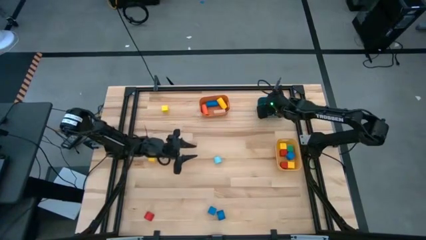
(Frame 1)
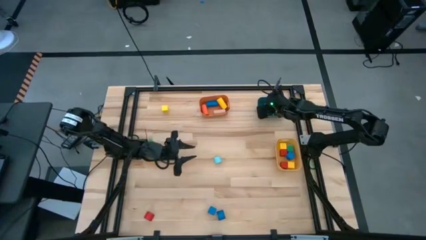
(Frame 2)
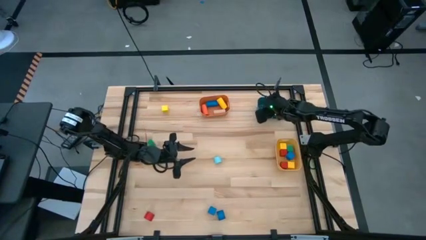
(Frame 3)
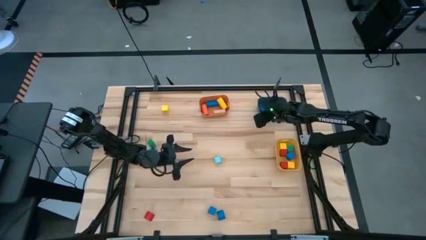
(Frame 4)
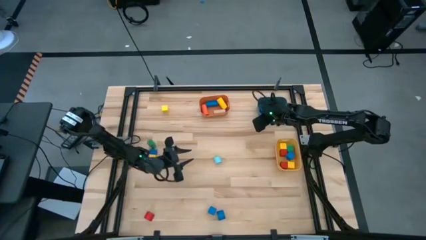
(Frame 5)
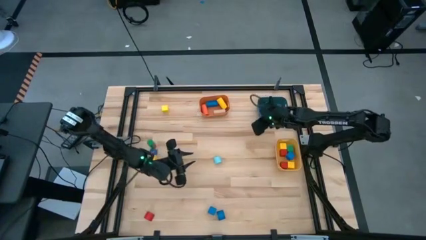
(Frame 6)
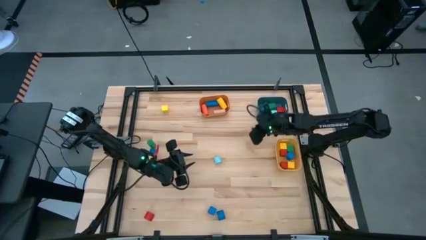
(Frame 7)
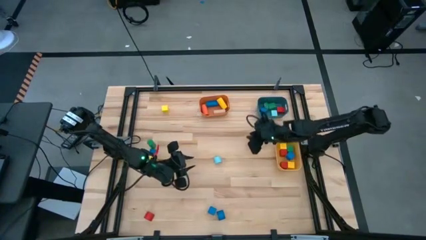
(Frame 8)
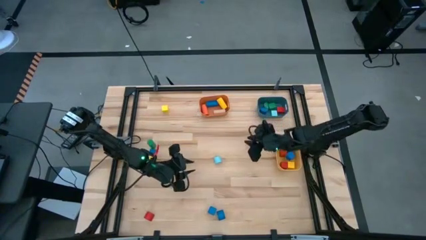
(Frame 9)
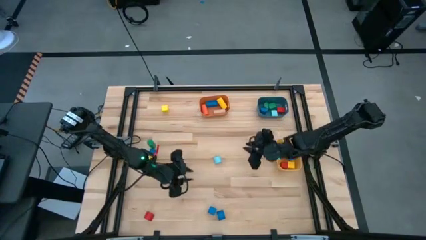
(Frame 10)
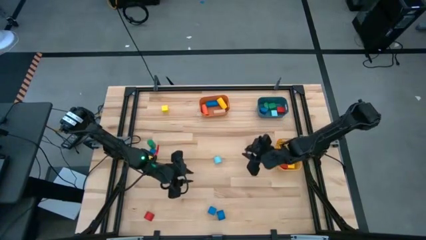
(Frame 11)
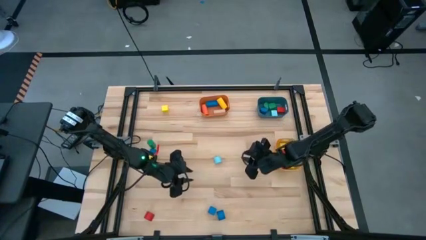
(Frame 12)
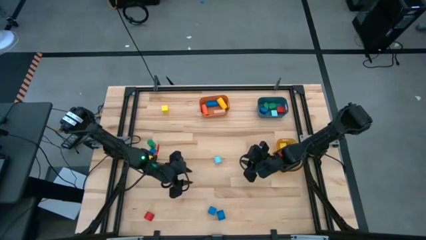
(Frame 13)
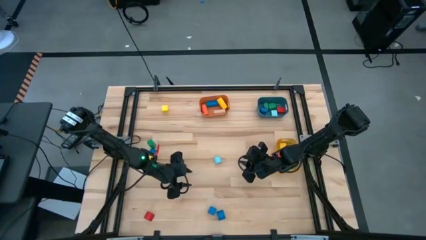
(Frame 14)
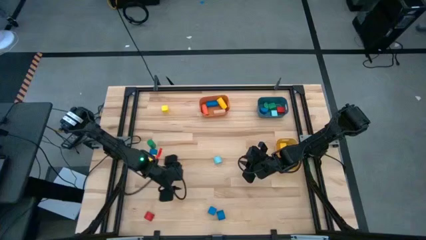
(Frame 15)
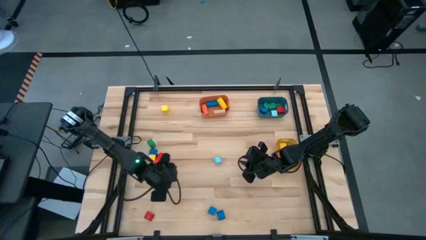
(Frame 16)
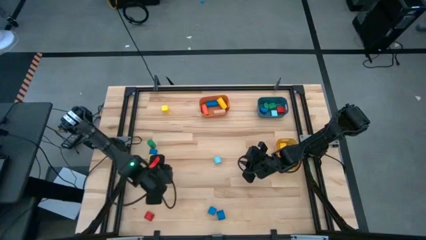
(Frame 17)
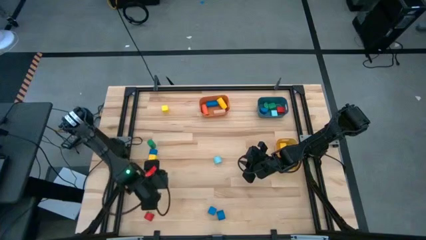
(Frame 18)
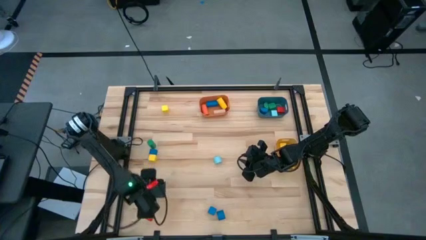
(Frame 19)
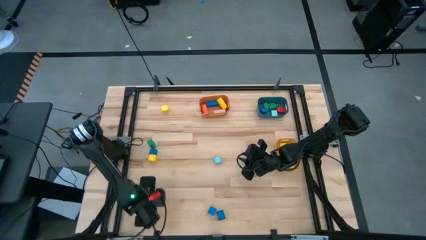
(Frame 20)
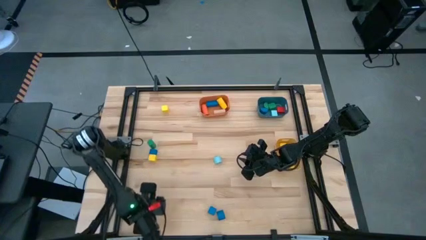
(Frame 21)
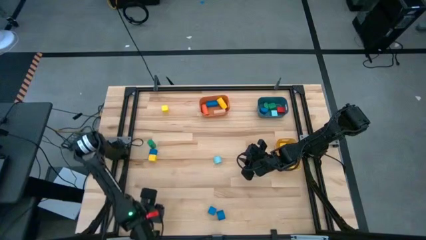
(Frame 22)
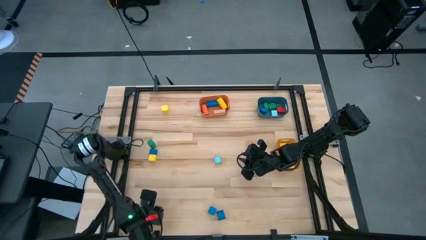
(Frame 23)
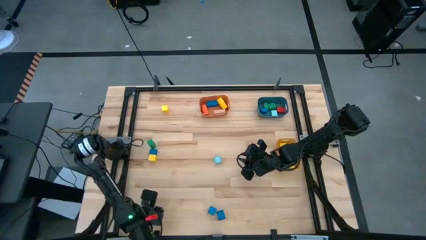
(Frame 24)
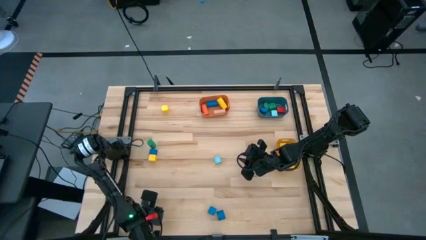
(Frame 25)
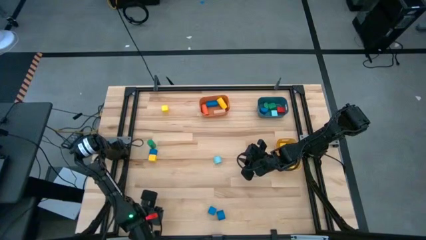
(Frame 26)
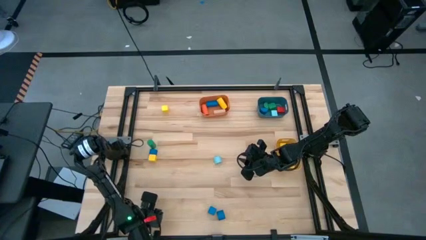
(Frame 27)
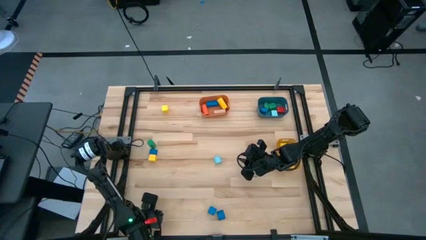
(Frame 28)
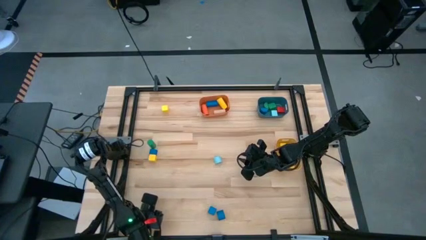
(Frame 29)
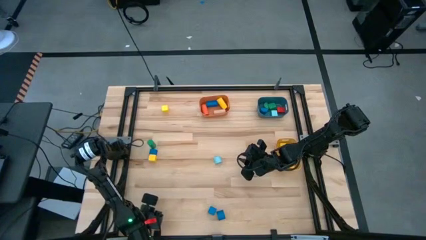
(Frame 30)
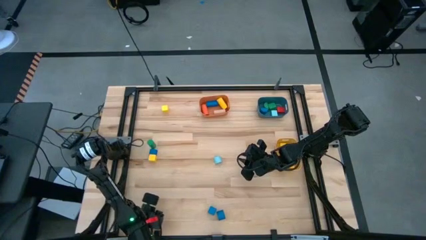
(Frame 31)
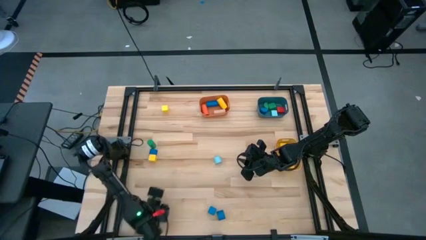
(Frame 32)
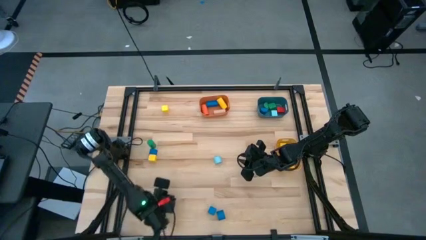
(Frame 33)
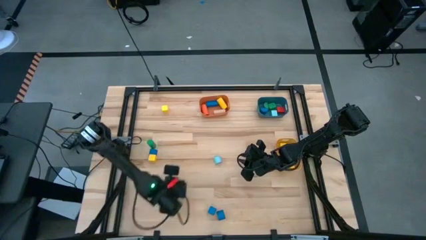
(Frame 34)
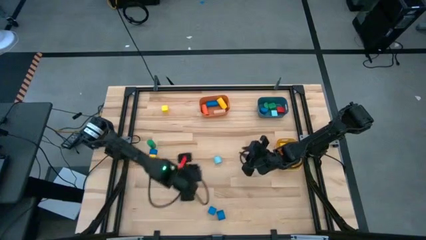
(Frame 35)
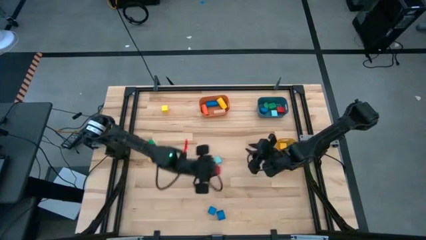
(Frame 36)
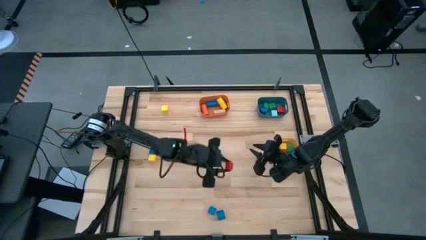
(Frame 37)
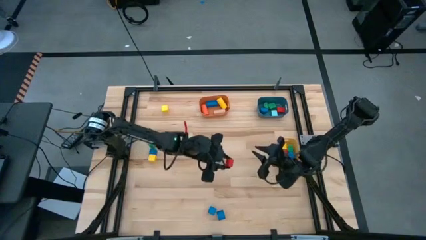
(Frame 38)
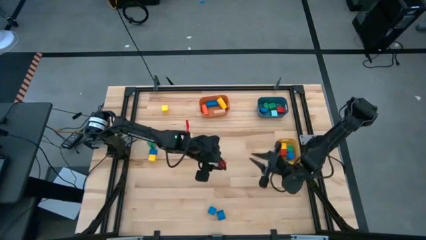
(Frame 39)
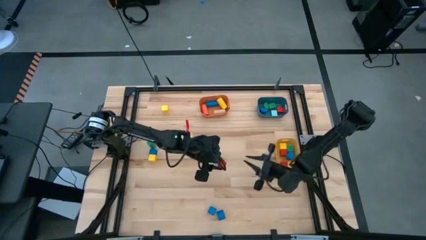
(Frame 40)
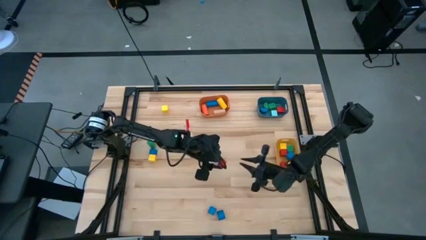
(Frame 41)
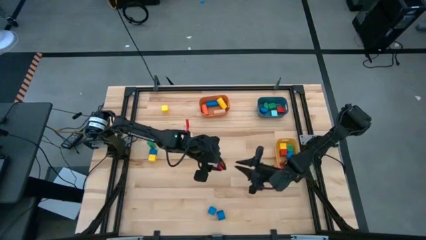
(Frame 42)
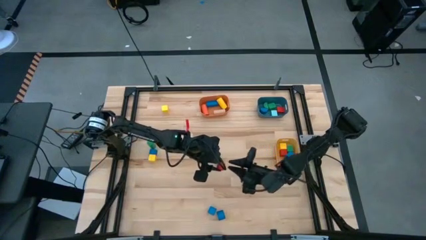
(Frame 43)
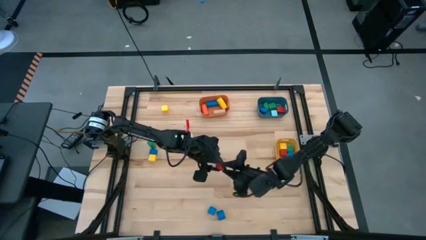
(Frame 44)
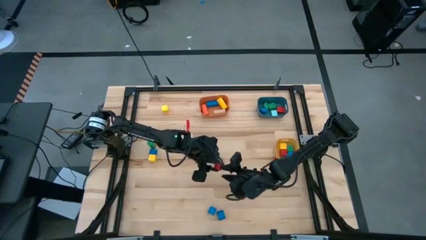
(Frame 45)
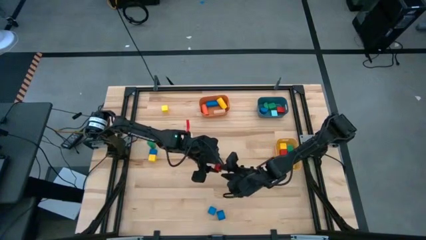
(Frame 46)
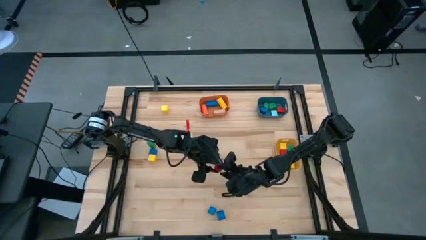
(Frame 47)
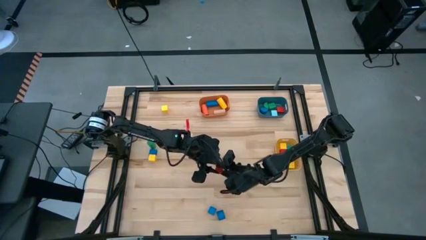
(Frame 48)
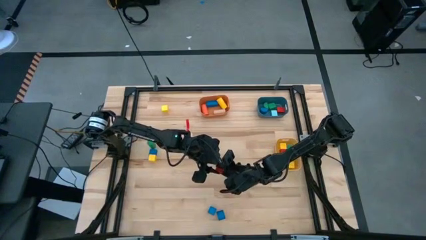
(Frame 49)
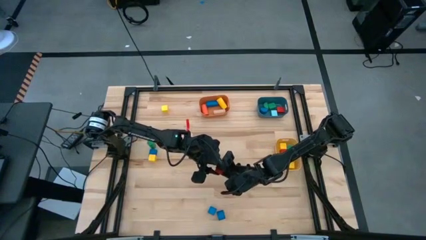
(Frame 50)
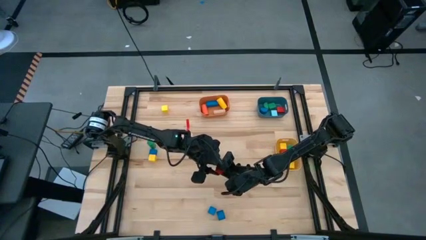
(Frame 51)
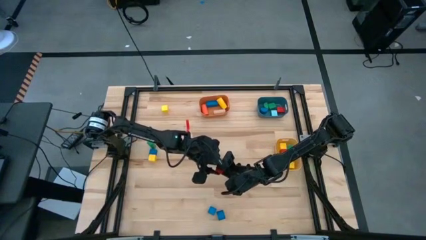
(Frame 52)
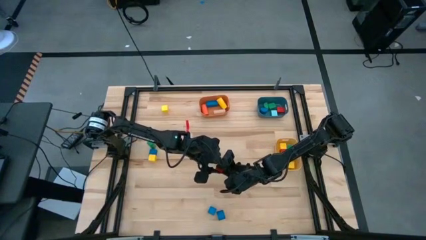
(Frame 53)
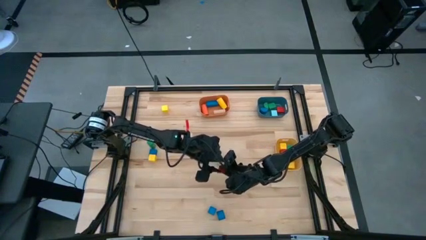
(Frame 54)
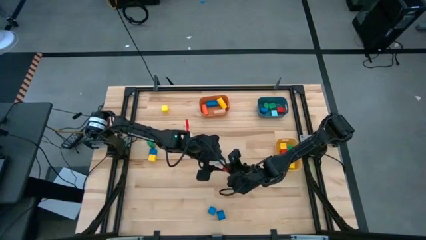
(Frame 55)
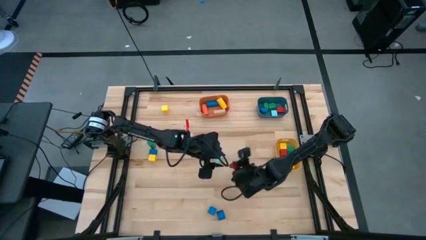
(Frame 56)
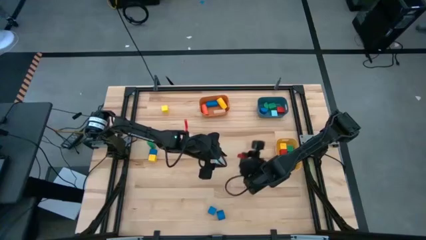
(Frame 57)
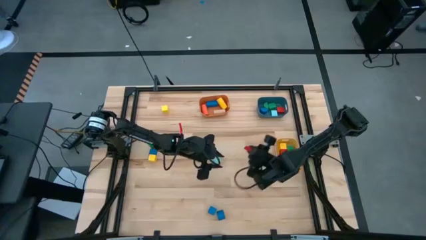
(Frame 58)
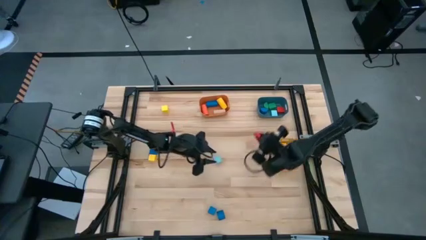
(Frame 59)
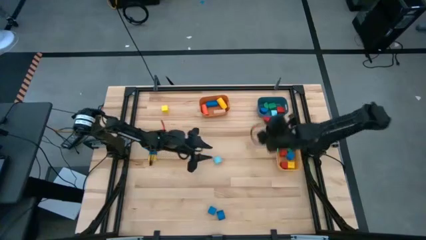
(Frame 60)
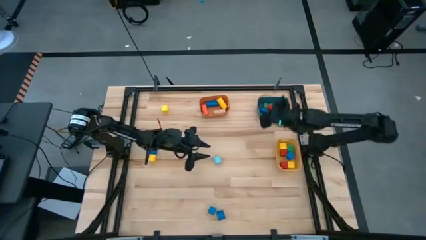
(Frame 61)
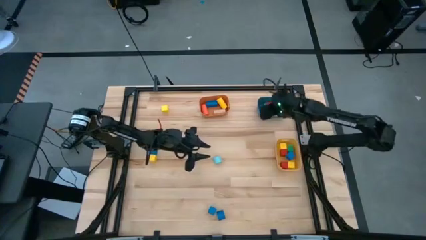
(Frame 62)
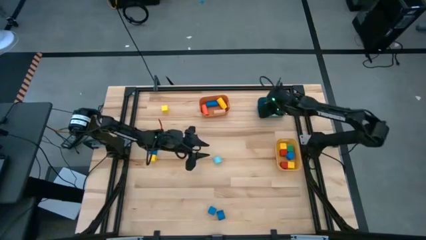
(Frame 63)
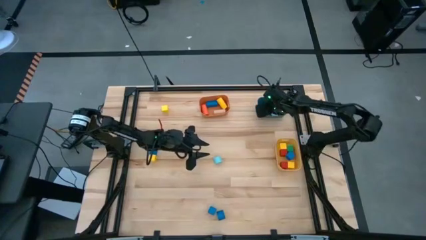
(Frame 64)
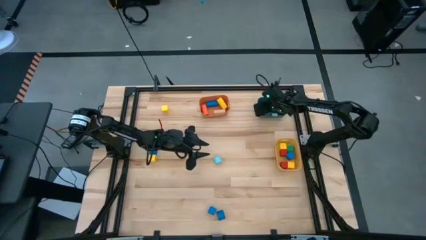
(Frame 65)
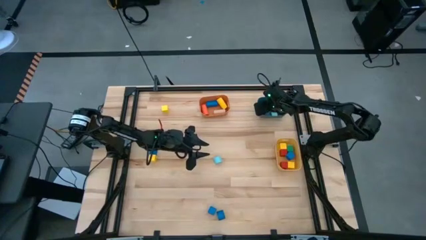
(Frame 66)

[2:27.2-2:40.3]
Task: Sort blocks by size
Put the red half circle block into the blue bin
